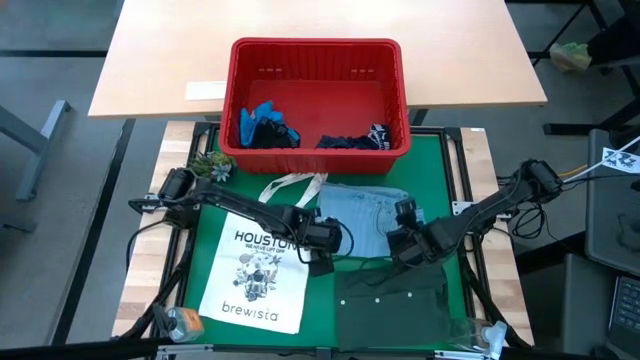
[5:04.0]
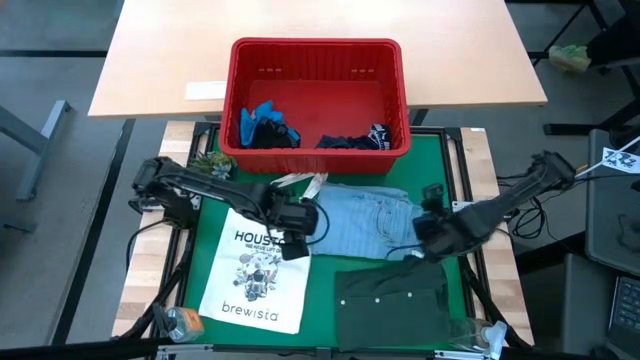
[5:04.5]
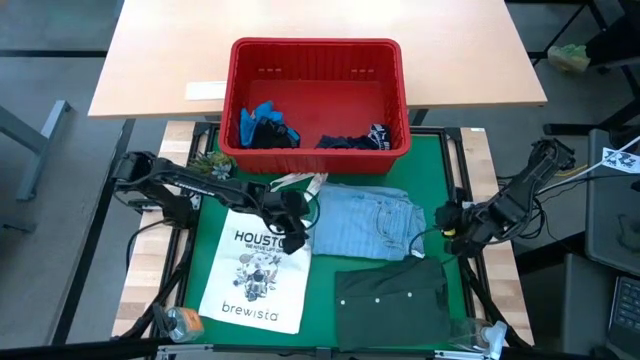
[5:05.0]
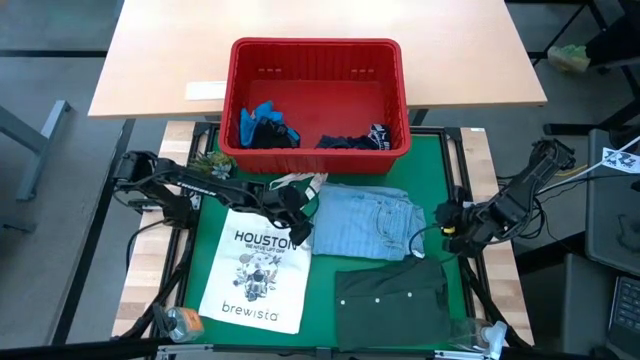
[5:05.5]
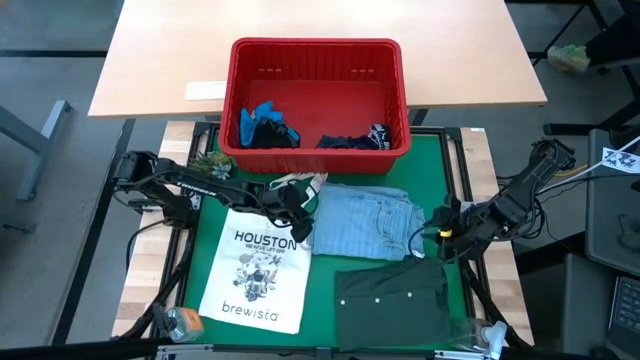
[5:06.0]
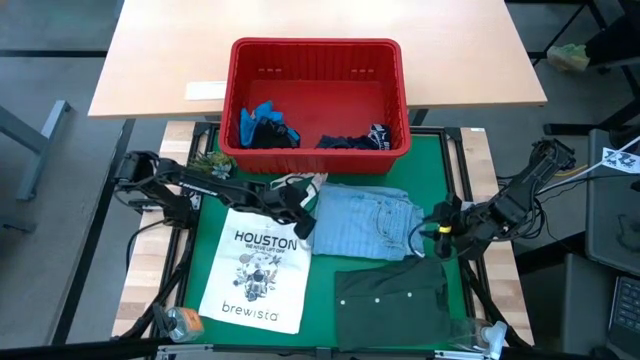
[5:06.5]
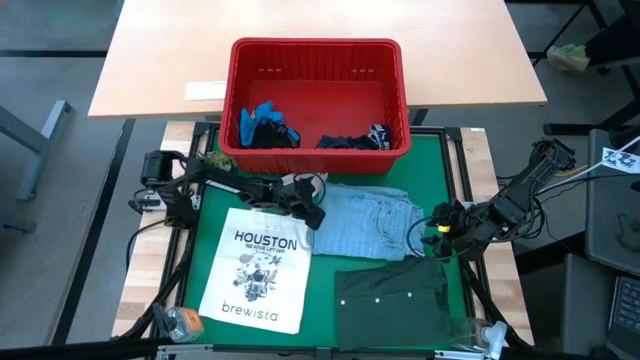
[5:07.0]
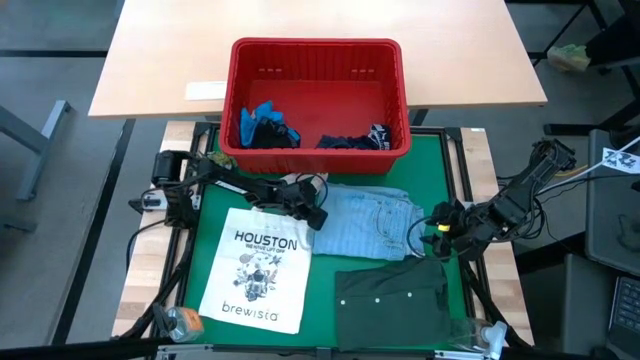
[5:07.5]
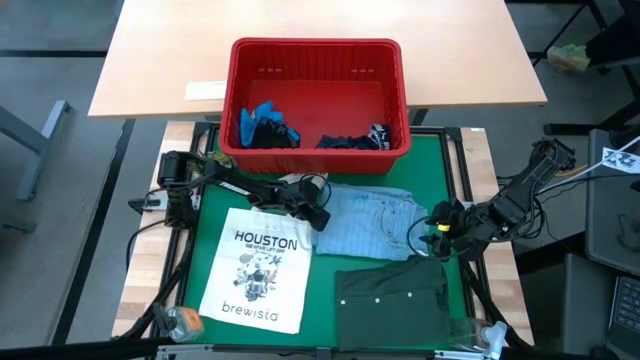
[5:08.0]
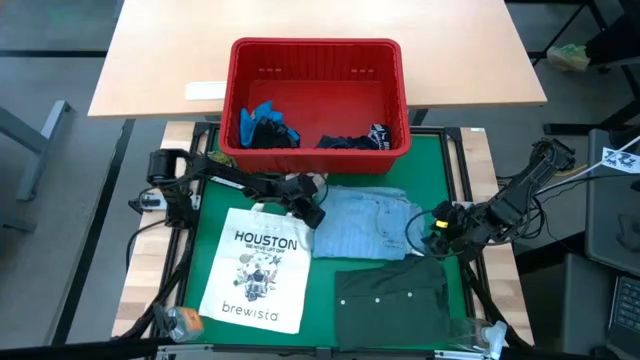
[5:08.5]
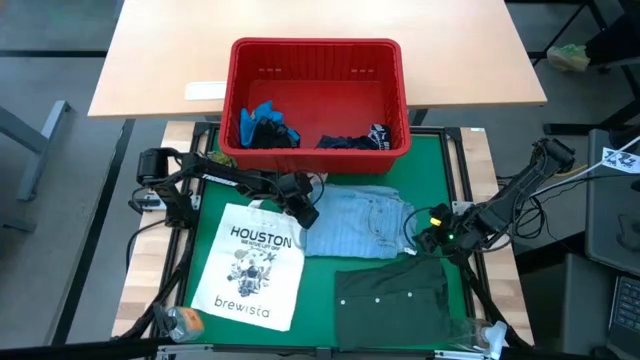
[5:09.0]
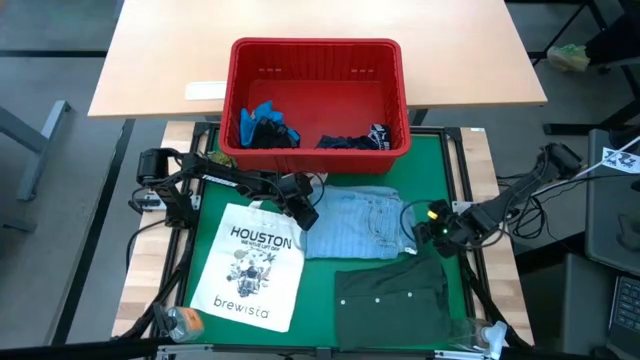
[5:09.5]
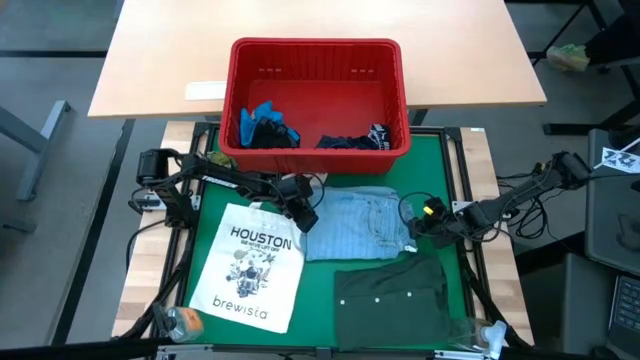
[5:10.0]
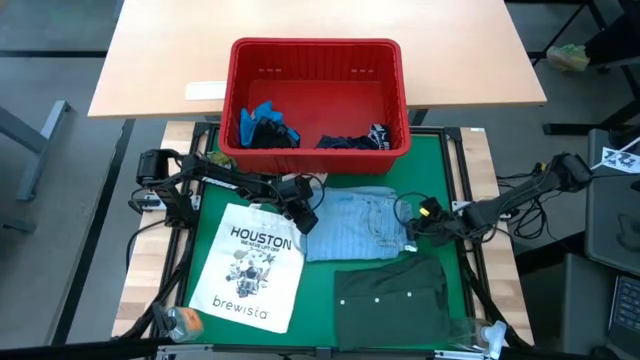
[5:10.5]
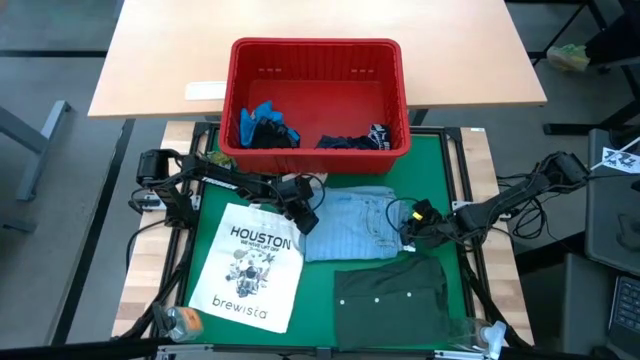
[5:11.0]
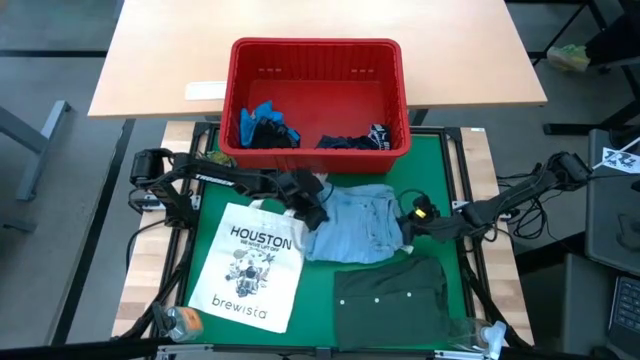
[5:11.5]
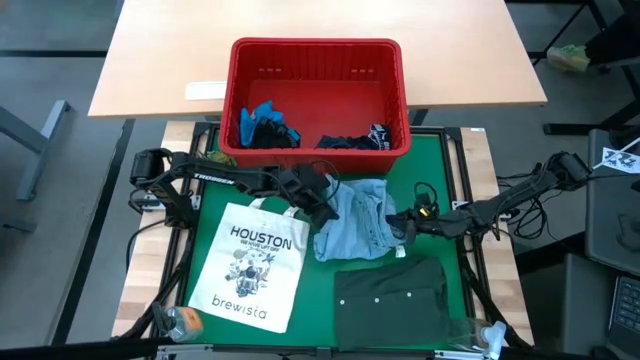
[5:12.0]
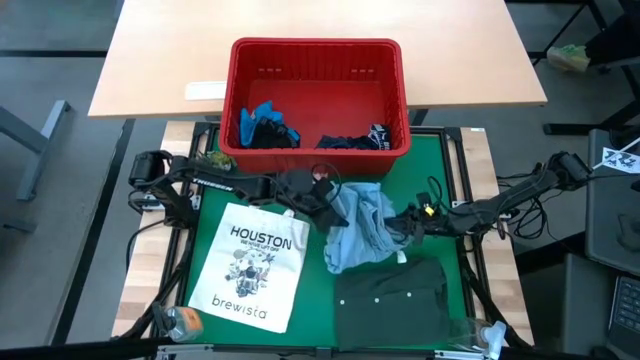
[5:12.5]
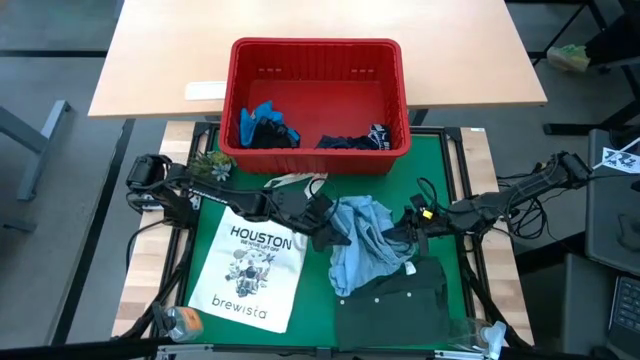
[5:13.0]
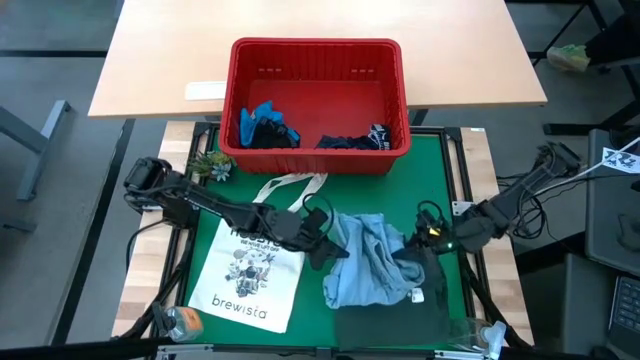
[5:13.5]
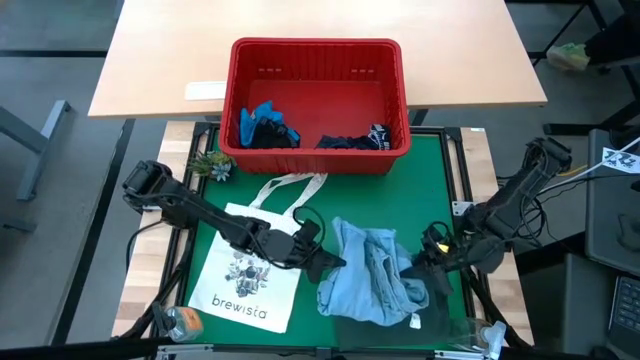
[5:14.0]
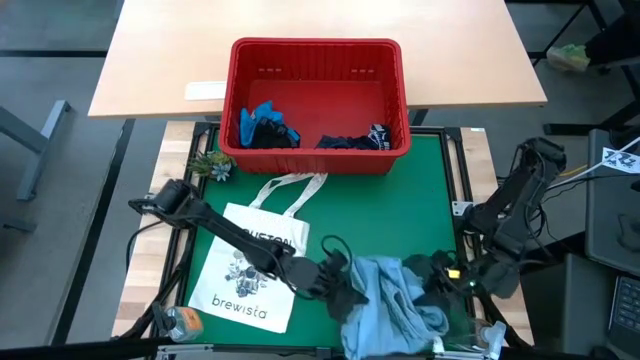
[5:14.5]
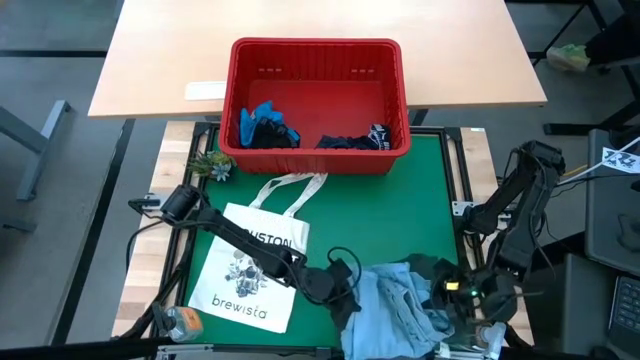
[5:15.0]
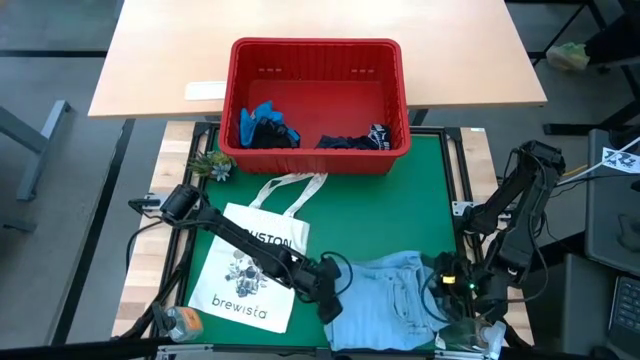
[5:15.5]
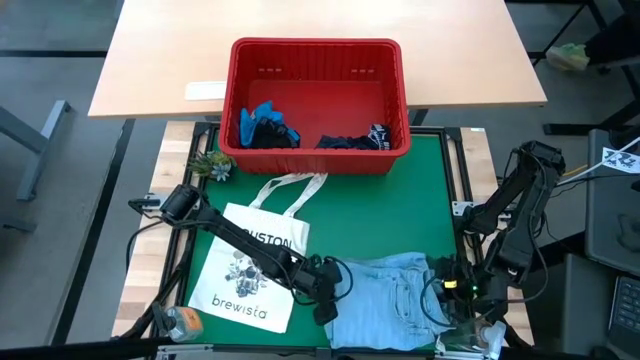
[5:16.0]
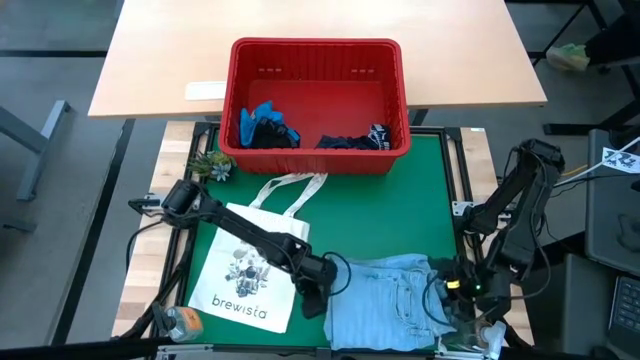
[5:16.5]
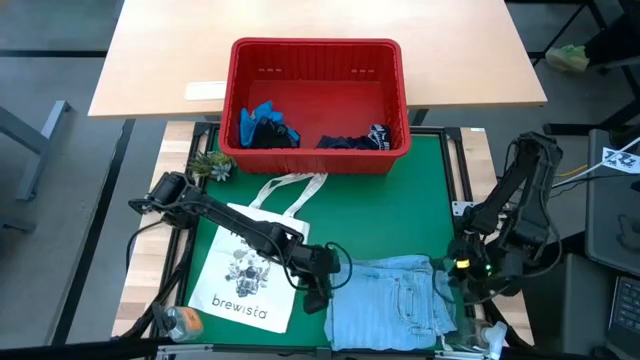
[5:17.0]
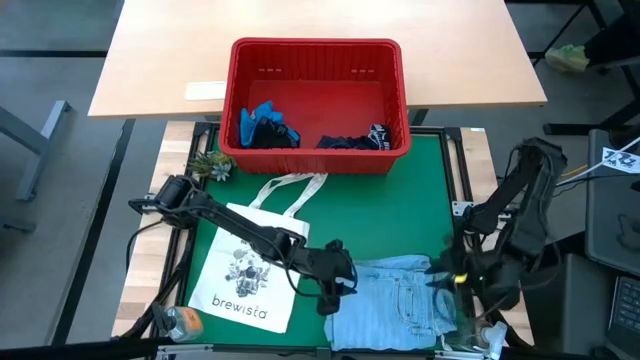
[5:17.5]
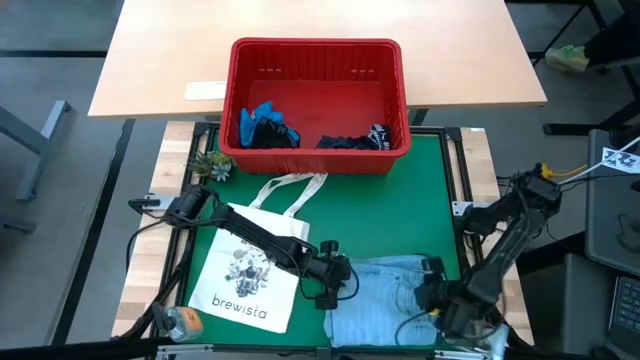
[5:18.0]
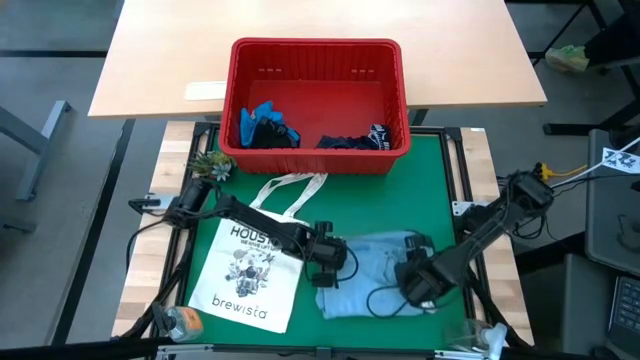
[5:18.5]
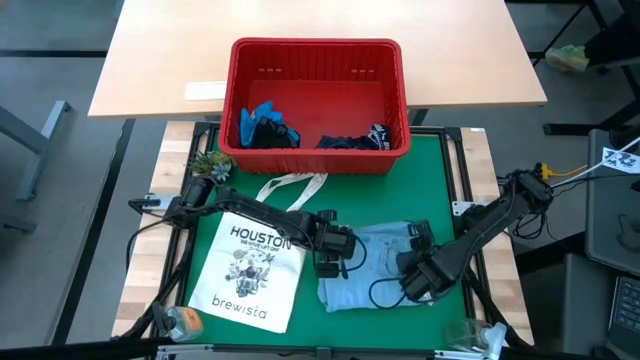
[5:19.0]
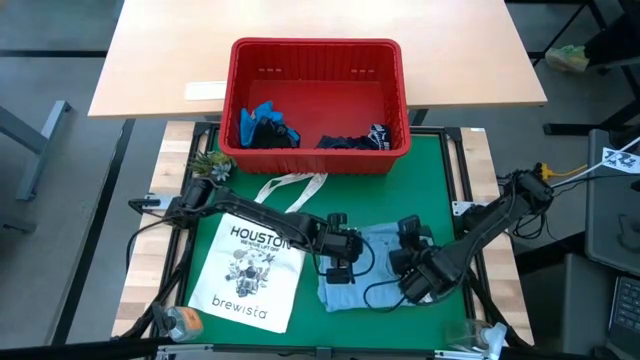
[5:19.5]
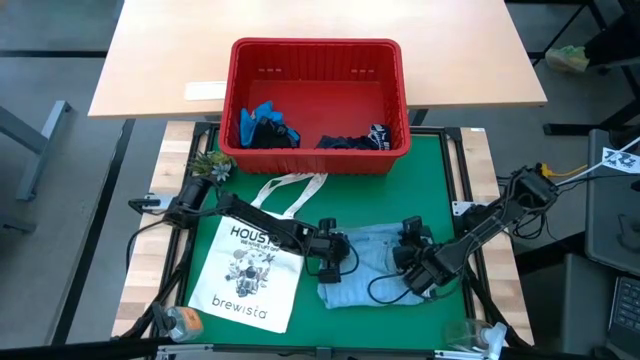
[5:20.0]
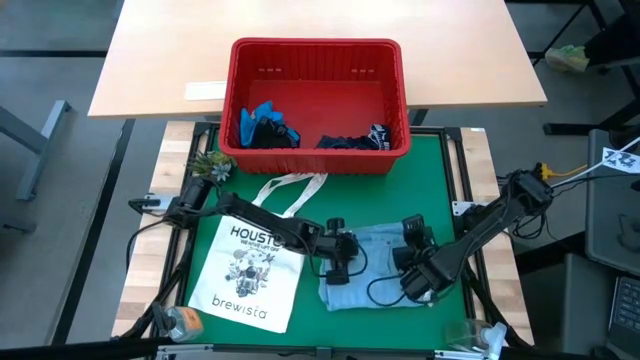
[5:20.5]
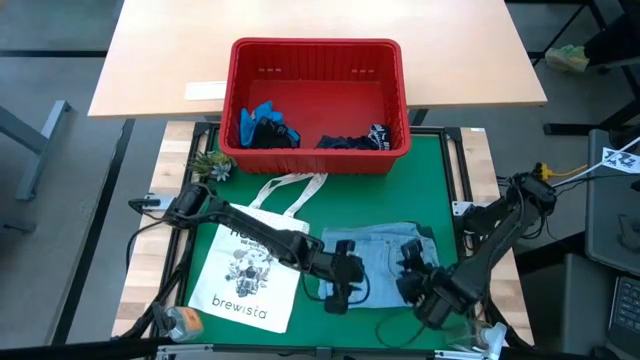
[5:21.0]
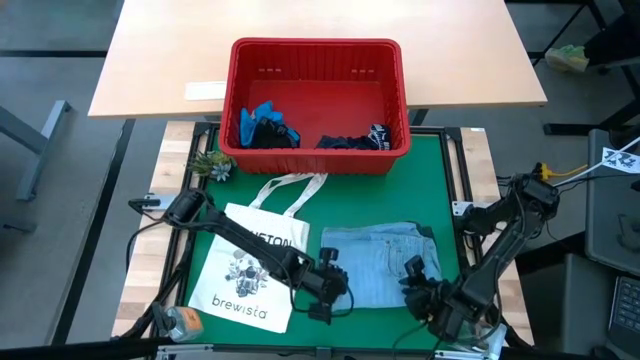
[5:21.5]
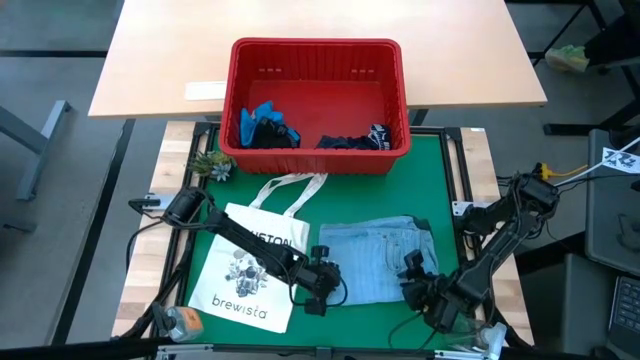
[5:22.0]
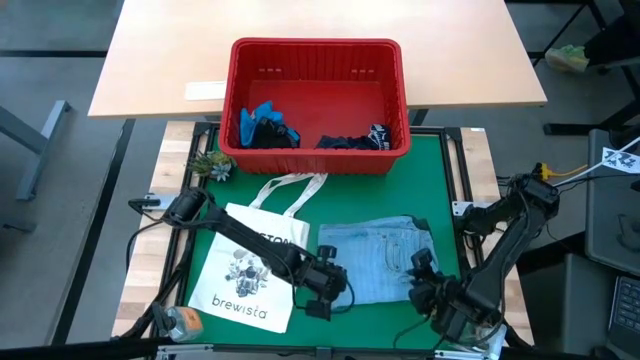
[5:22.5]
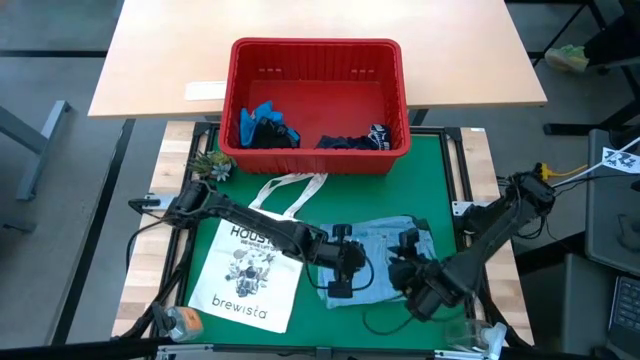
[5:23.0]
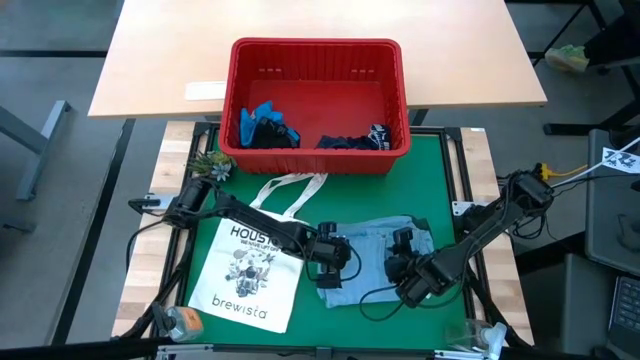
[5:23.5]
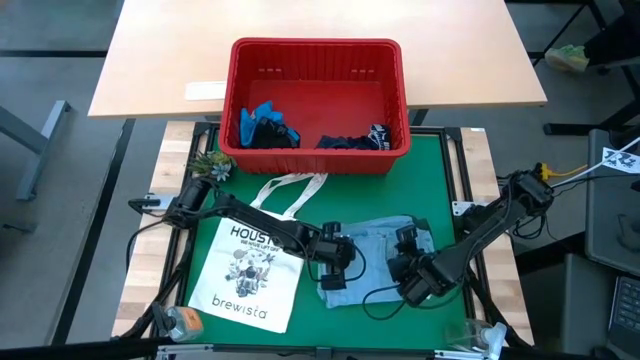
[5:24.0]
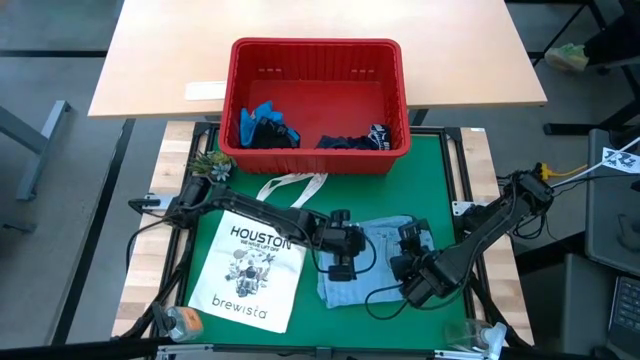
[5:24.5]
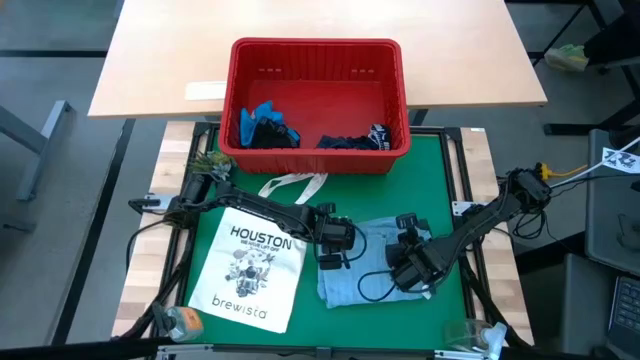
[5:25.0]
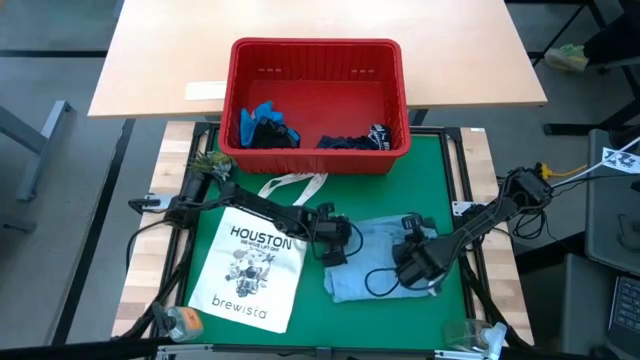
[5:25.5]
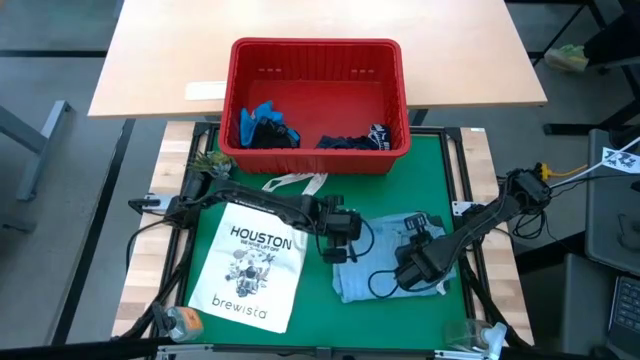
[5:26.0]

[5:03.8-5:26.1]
Task: Fold Laundry from Bin
Stack the light blue jeans on top of the green t-shirt
